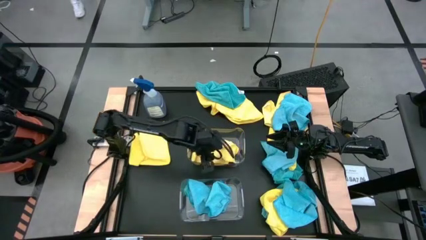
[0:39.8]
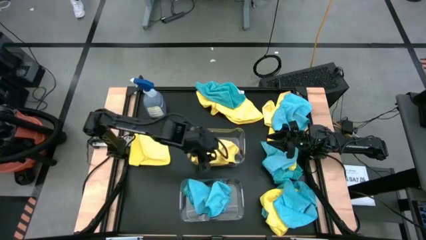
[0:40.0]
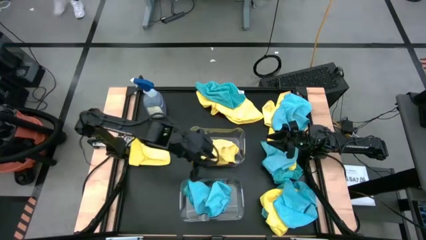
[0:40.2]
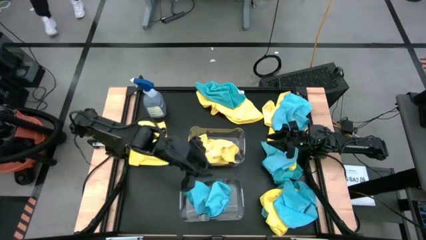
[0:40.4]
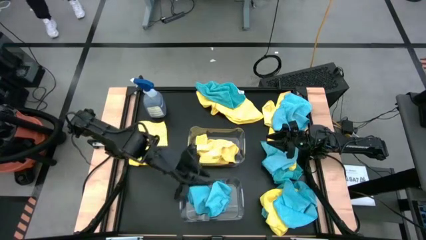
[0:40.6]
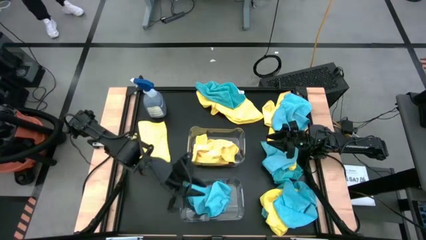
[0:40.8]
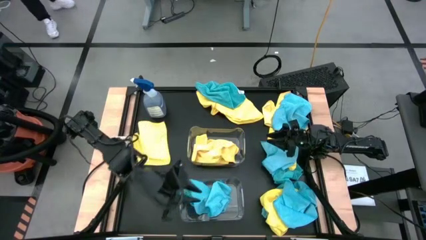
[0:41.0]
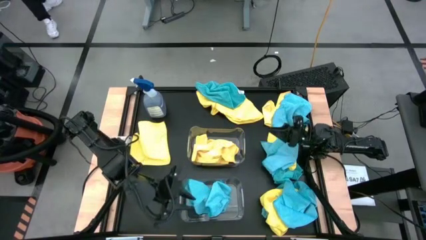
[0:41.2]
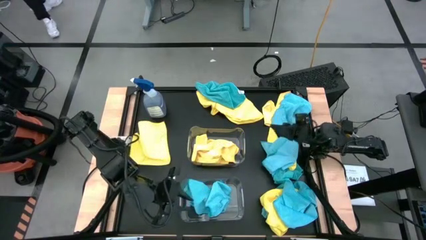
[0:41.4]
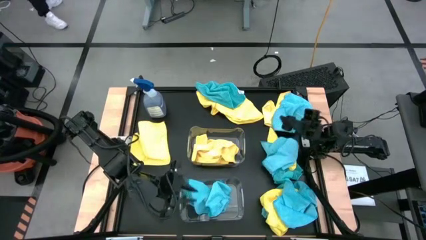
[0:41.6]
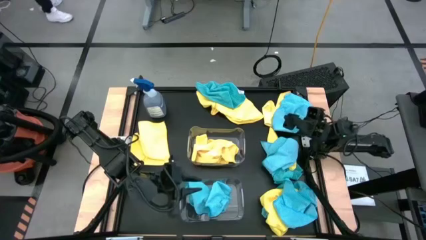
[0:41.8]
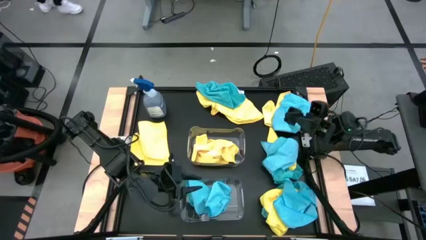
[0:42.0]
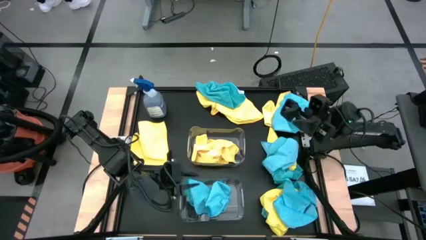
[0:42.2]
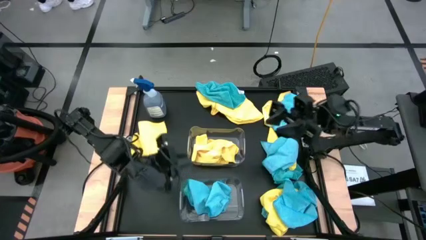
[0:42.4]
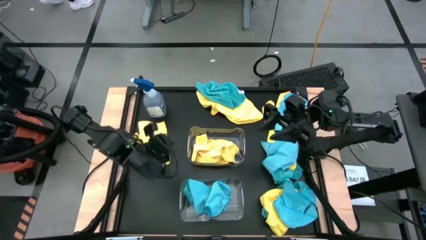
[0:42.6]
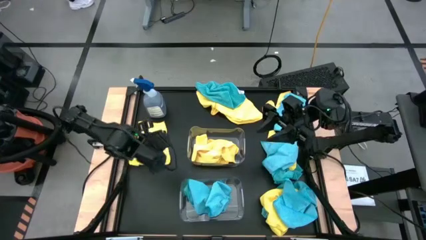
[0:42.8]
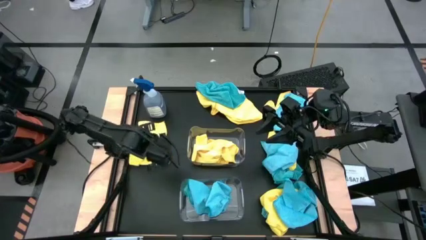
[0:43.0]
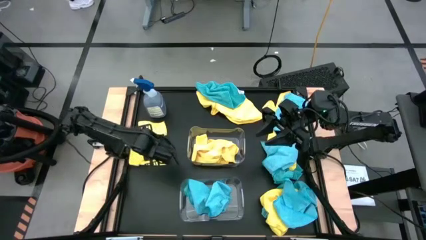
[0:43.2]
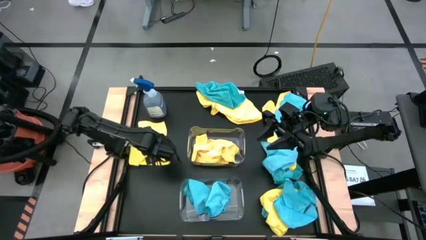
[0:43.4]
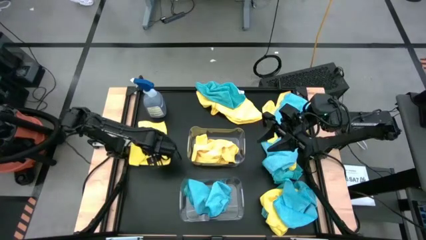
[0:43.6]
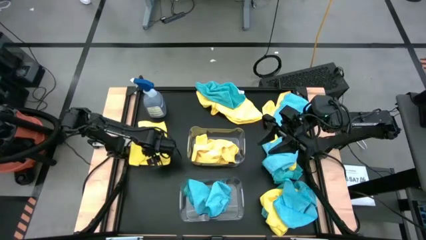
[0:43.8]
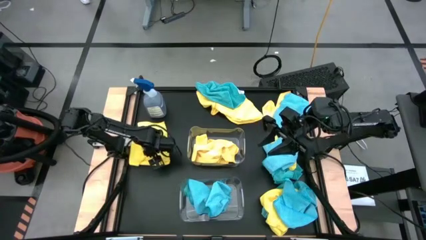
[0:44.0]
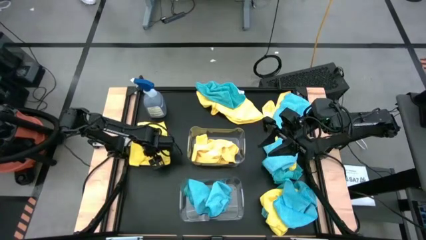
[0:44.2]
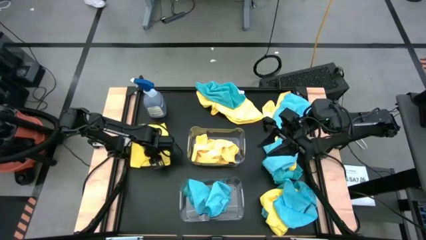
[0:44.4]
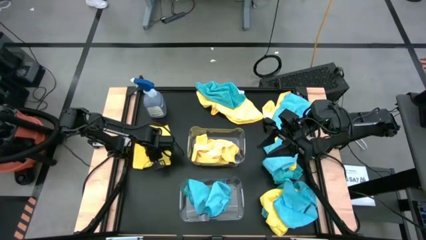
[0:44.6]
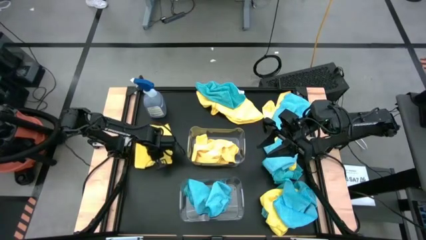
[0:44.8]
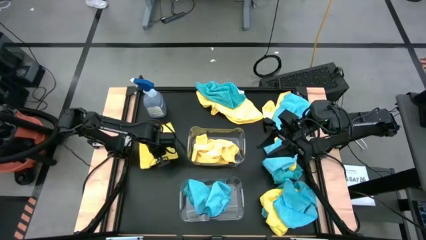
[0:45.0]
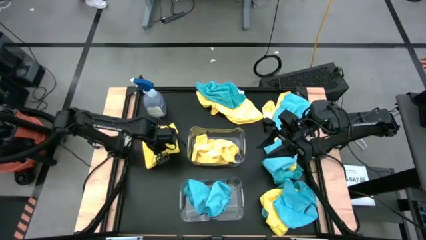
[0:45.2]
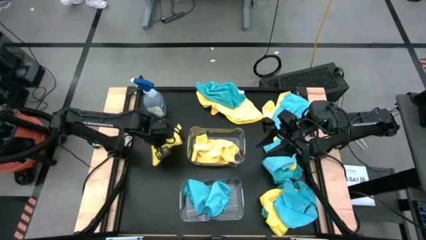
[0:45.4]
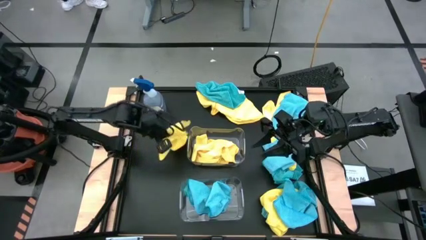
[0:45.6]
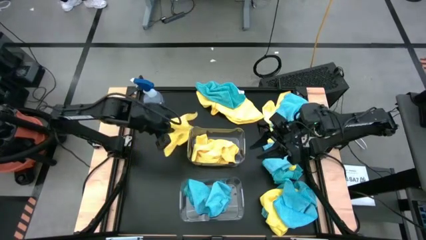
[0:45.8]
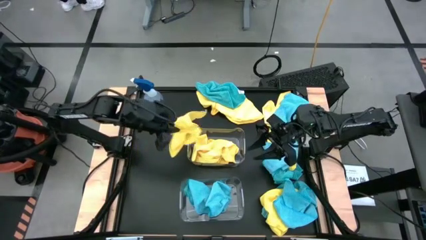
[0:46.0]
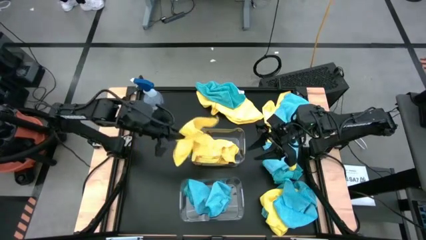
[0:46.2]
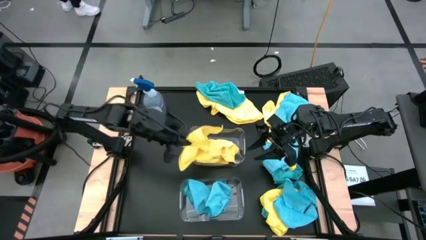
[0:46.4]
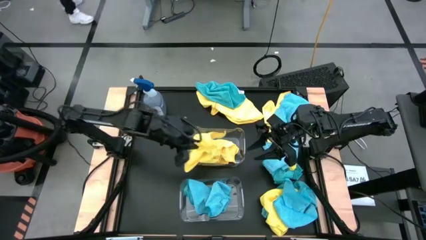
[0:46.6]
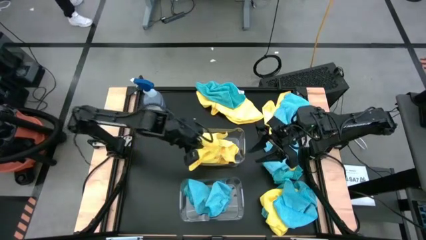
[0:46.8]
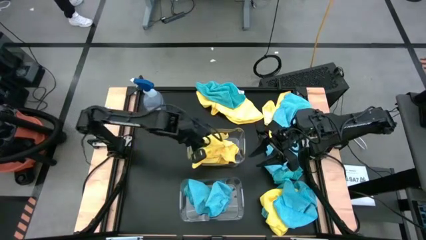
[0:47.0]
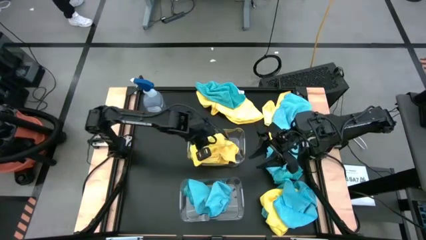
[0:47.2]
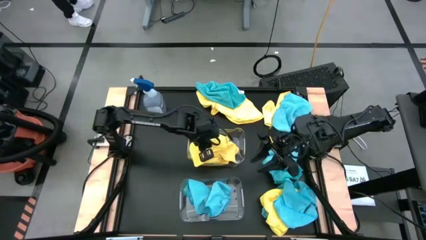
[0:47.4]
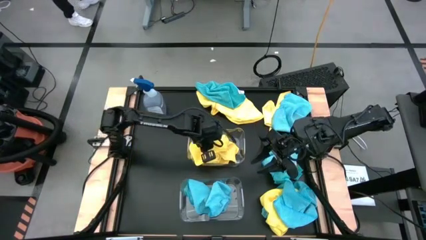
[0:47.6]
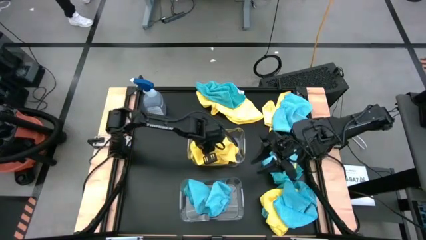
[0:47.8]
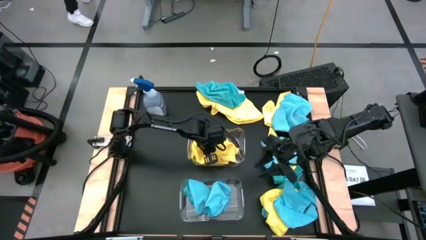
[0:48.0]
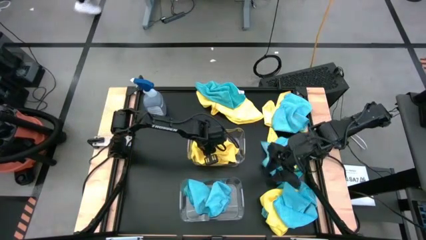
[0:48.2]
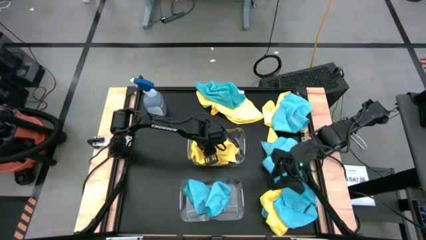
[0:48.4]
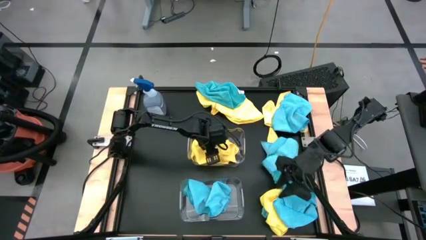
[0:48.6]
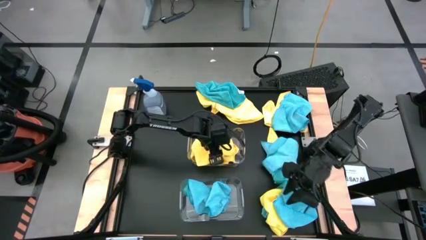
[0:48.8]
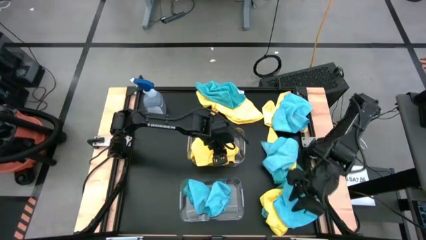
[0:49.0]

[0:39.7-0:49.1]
Task: Sort microfiber towel by color & place in baskets
Put the yellow microfiber cloth into the top transparent bin

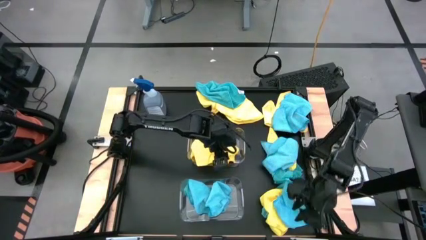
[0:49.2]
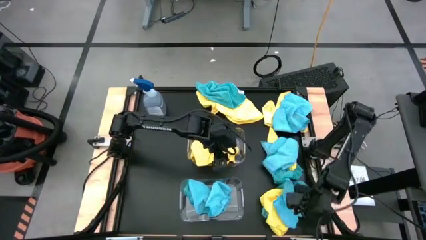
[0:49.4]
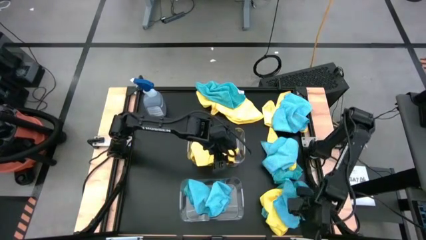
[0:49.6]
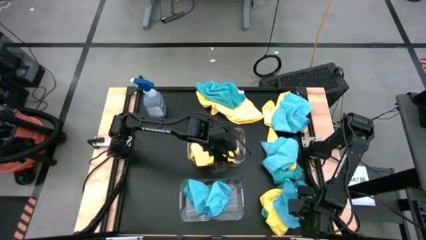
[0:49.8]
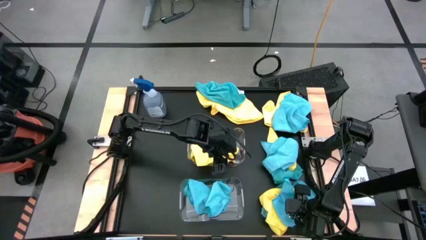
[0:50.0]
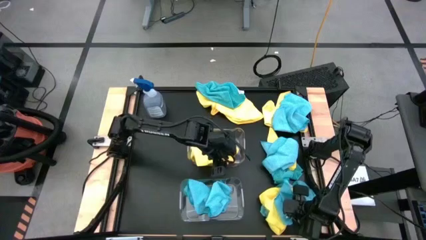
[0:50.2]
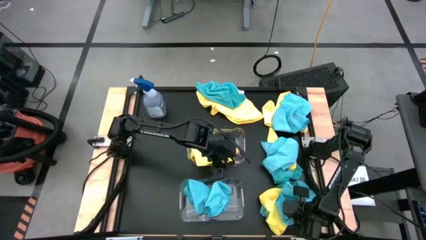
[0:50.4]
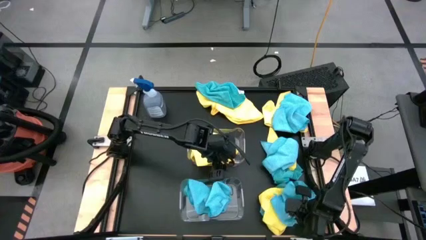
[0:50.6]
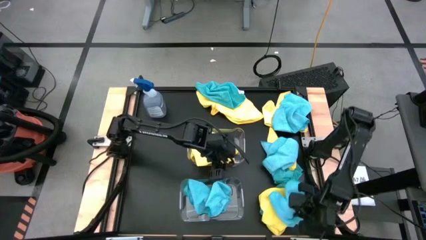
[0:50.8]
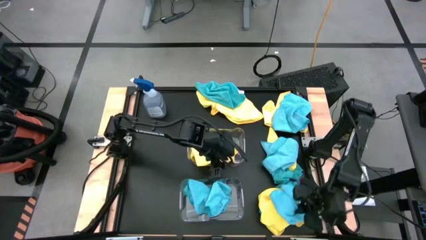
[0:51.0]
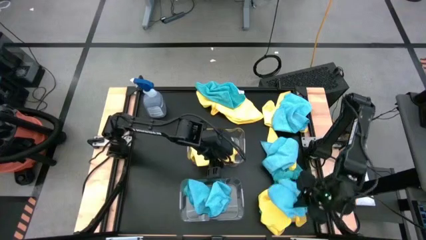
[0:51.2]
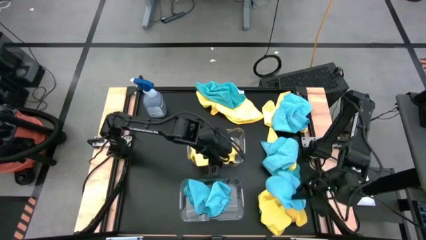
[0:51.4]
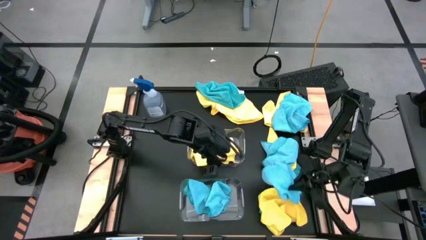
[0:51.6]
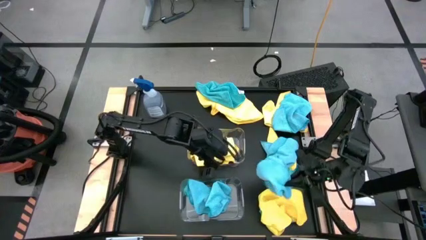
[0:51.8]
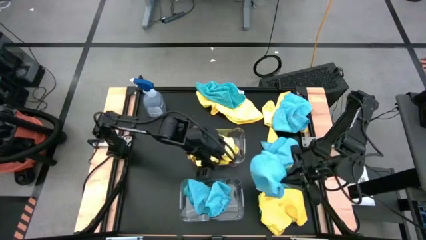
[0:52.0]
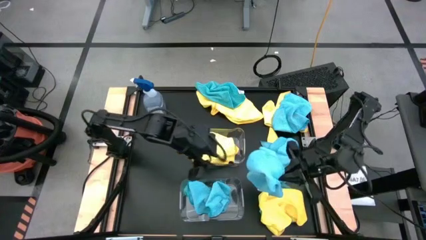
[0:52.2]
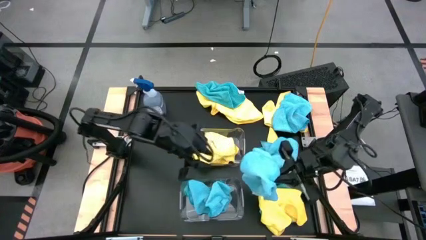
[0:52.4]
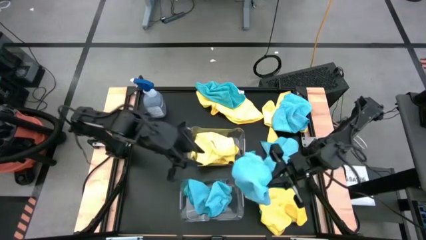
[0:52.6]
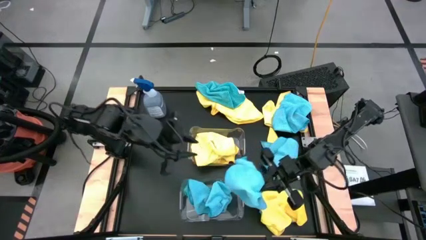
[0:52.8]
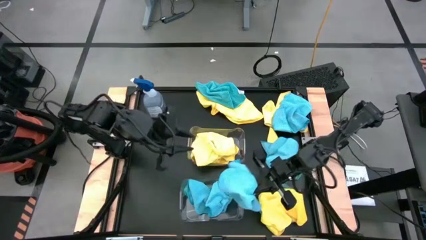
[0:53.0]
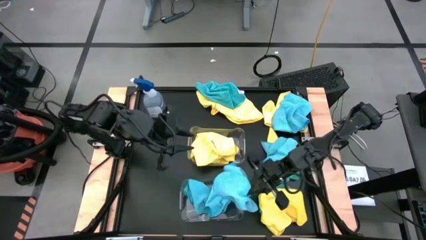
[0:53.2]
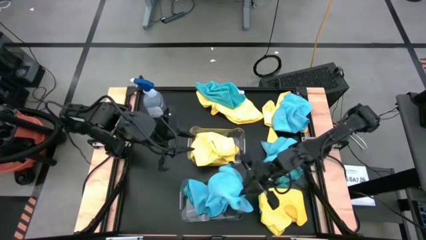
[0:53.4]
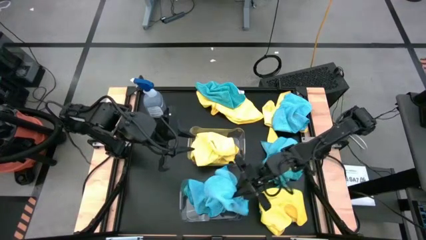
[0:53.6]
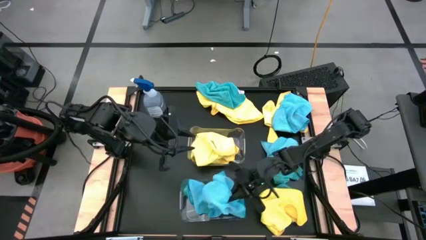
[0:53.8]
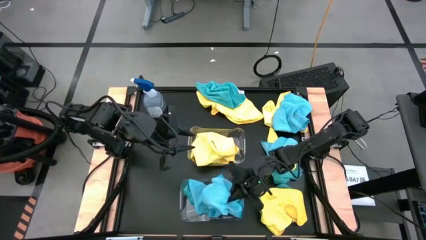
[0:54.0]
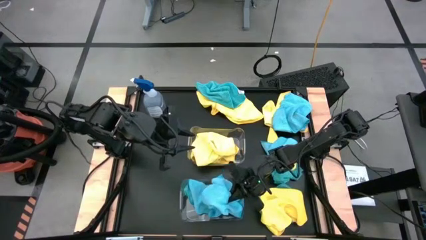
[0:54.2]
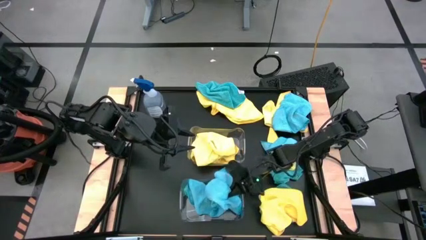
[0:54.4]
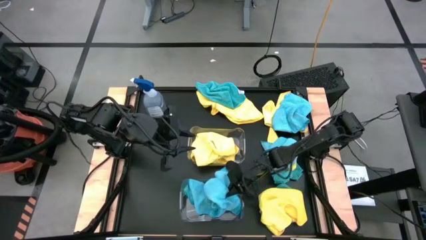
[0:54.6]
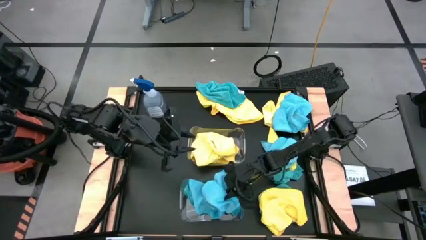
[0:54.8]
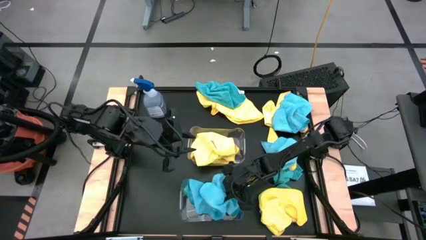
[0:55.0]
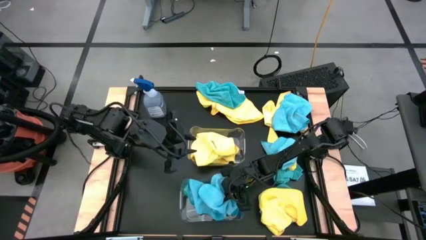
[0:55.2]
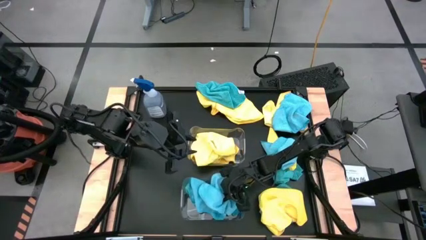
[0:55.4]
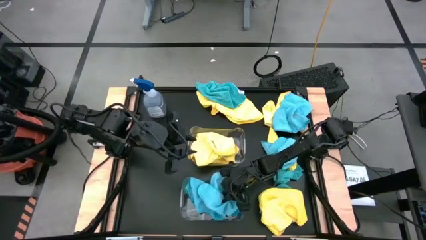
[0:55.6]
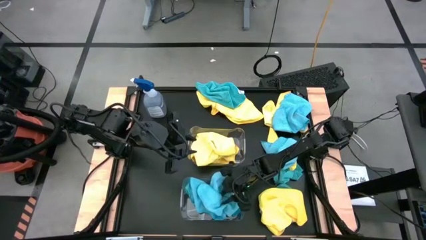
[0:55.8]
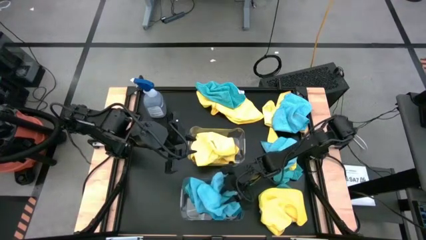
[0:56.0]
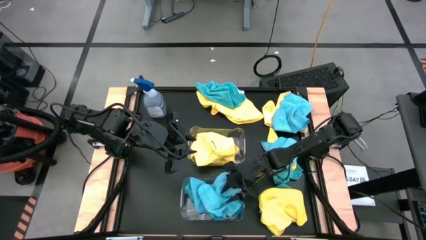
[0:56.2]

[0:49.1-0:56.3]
Put the blue microfiber cloth into the bottom transparent bin

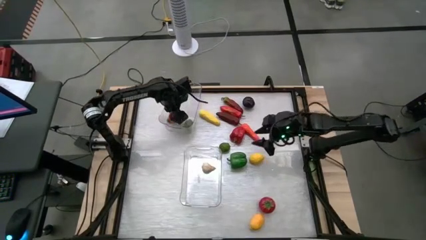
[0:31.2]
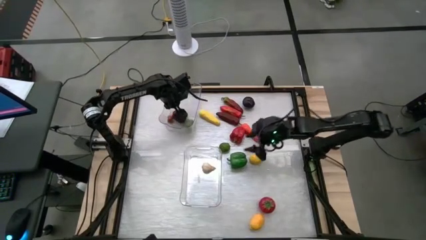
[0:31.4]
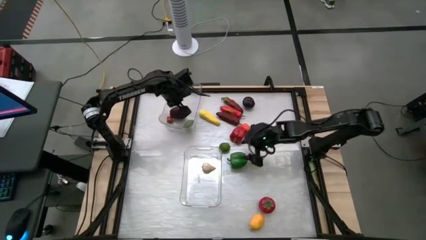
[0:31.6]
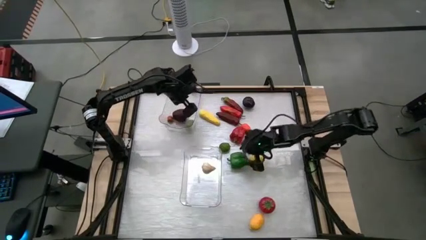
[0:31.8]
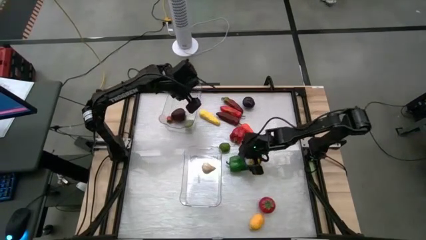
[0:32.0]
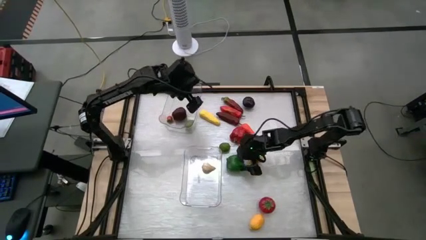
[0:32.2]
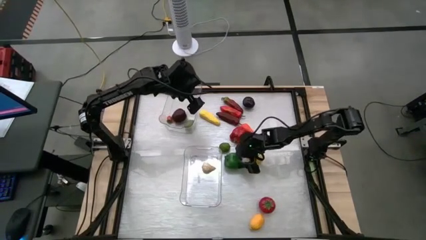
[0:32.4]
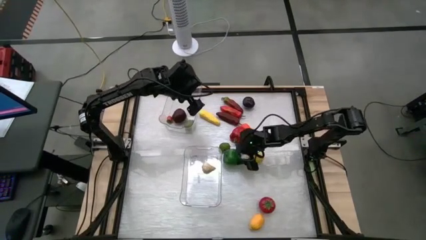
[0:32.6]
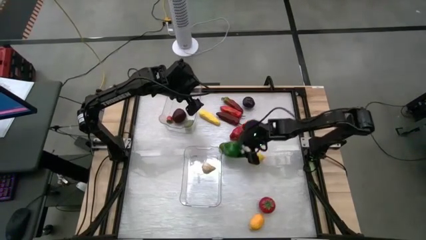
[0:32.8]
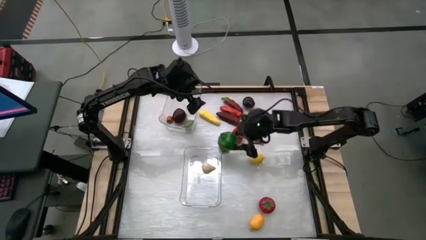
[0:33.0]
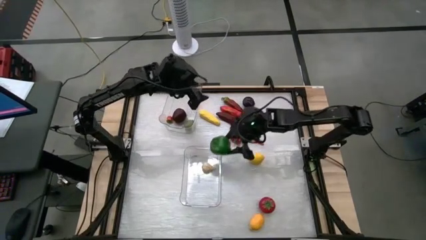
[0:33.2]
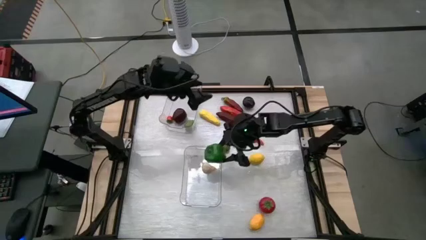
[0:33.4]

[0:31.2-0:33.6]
Task: Sort produce into baskets
Put the green bell pepper into the bottom transparent bin
